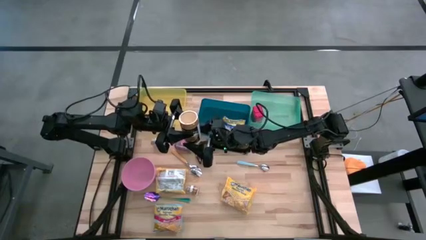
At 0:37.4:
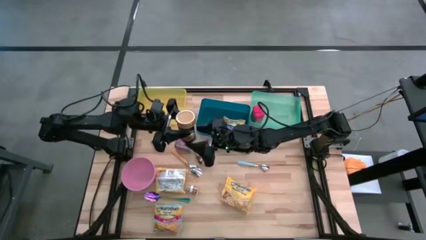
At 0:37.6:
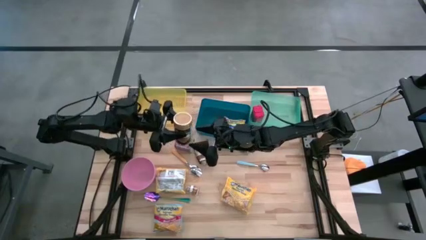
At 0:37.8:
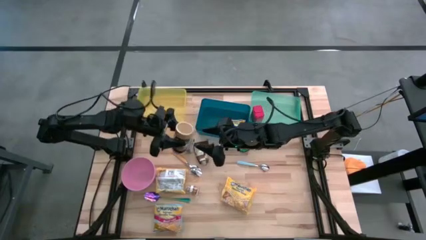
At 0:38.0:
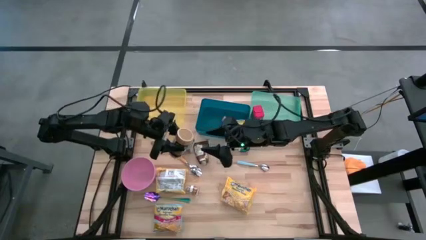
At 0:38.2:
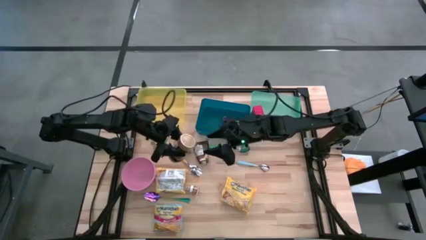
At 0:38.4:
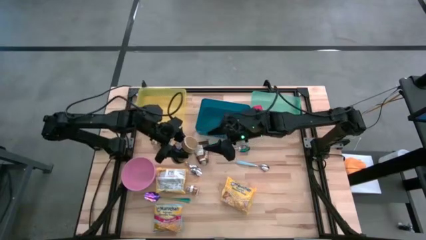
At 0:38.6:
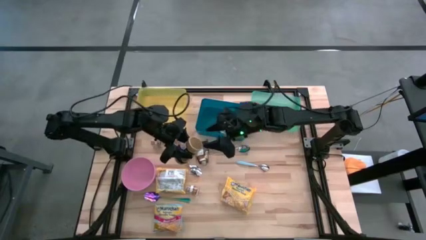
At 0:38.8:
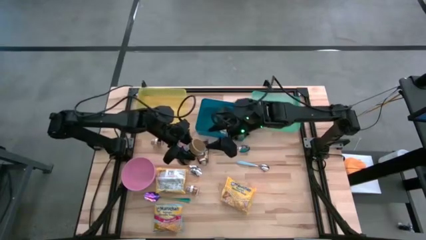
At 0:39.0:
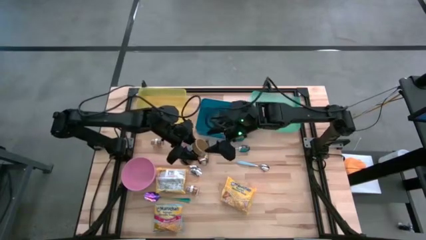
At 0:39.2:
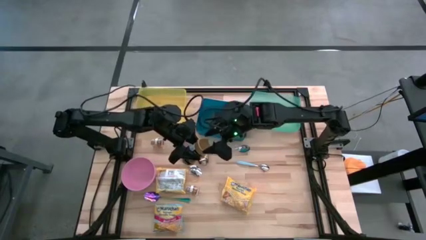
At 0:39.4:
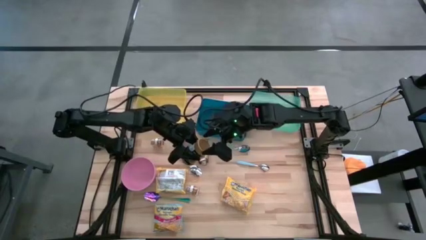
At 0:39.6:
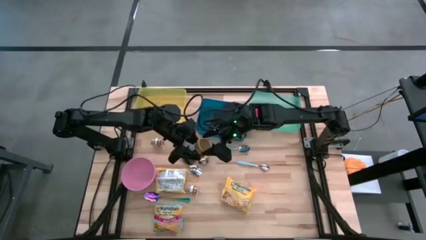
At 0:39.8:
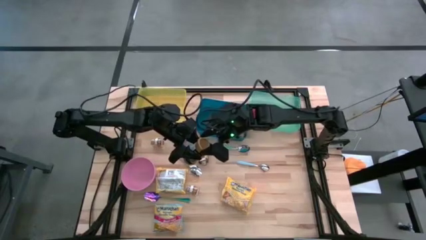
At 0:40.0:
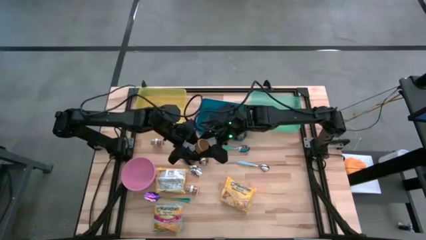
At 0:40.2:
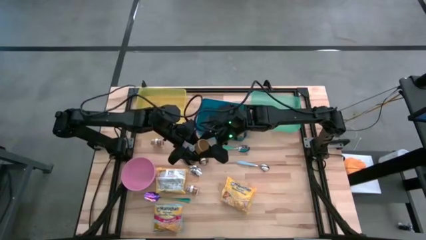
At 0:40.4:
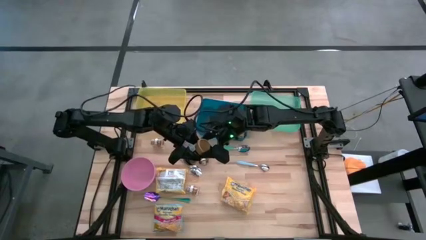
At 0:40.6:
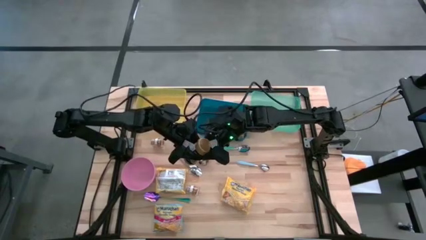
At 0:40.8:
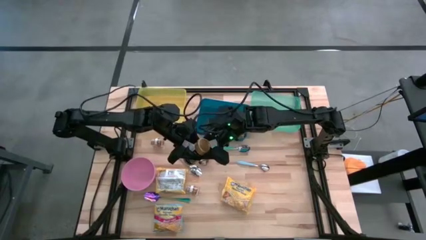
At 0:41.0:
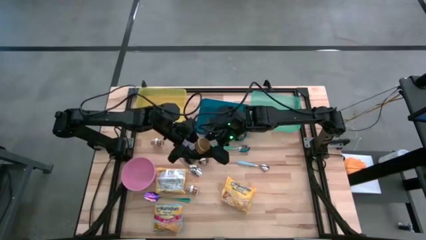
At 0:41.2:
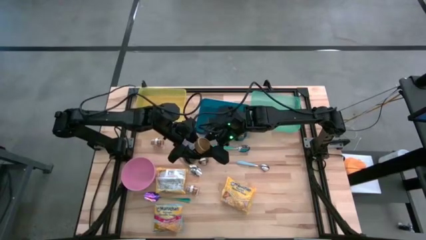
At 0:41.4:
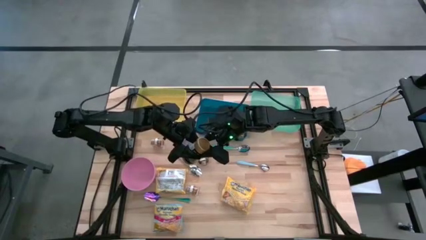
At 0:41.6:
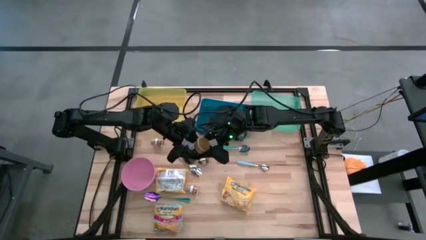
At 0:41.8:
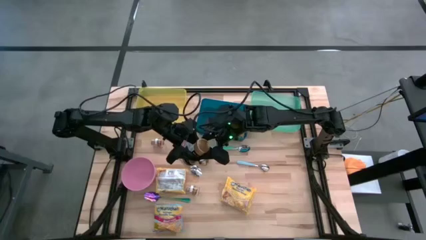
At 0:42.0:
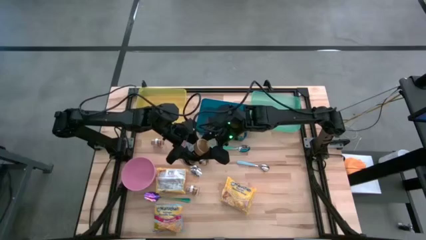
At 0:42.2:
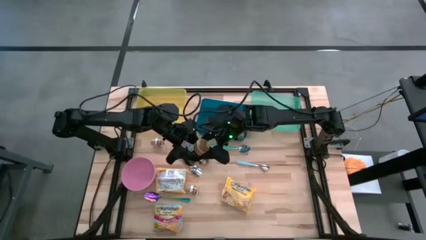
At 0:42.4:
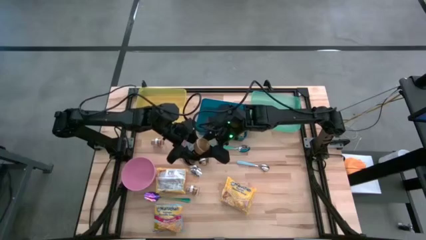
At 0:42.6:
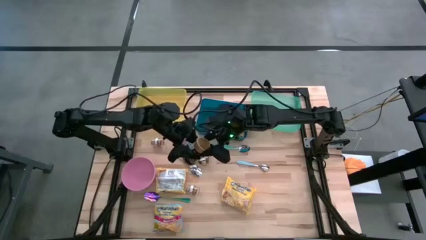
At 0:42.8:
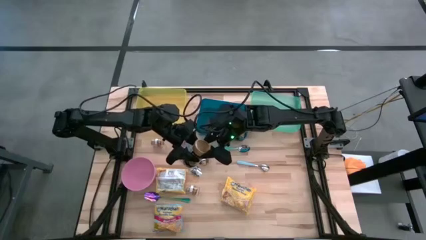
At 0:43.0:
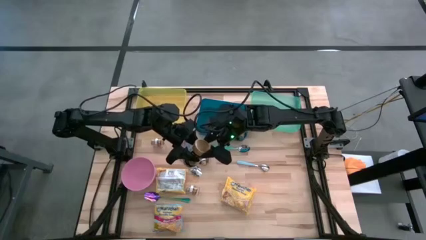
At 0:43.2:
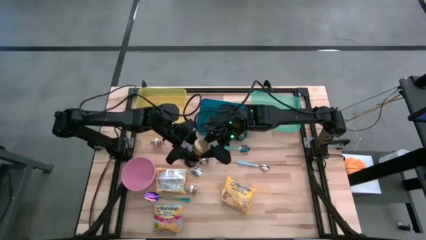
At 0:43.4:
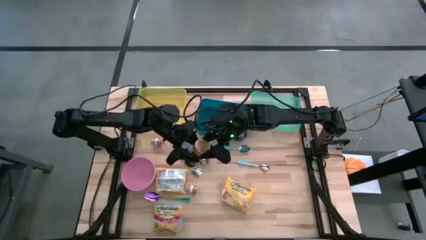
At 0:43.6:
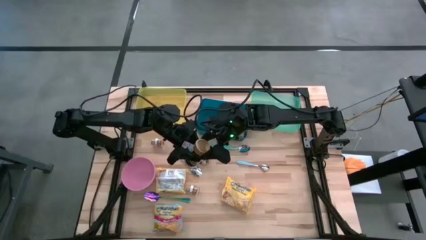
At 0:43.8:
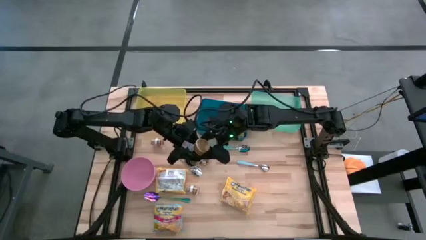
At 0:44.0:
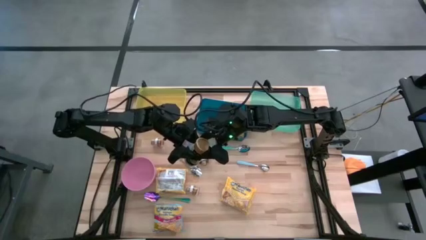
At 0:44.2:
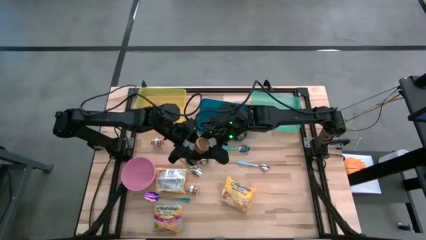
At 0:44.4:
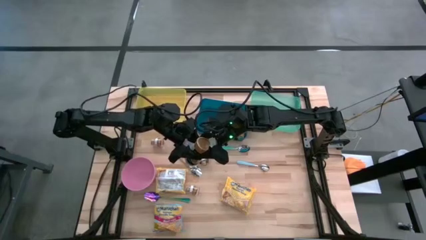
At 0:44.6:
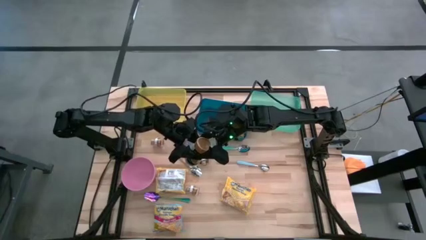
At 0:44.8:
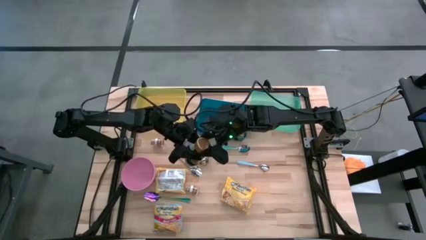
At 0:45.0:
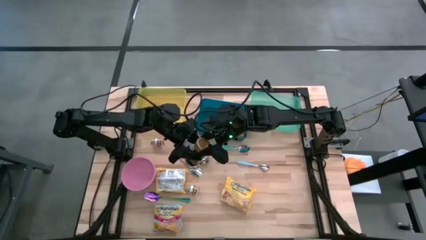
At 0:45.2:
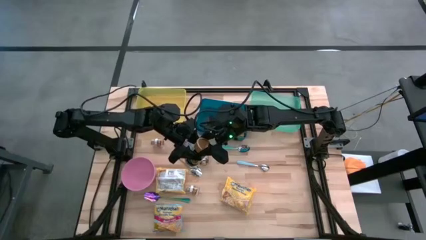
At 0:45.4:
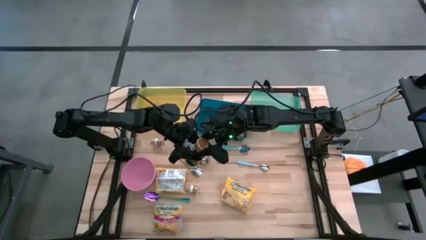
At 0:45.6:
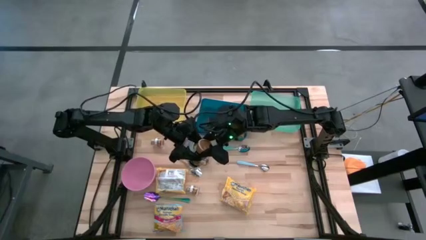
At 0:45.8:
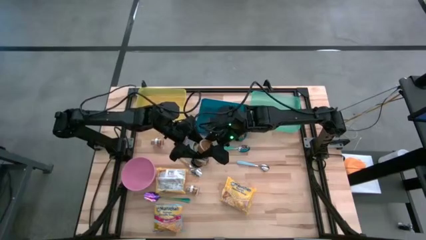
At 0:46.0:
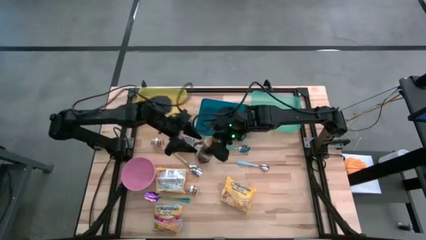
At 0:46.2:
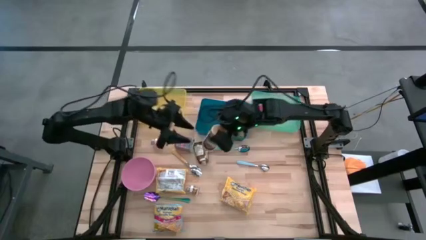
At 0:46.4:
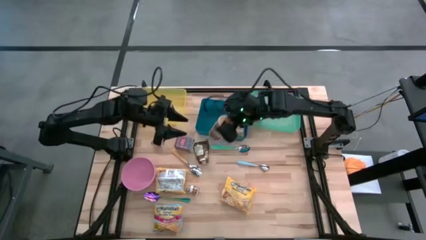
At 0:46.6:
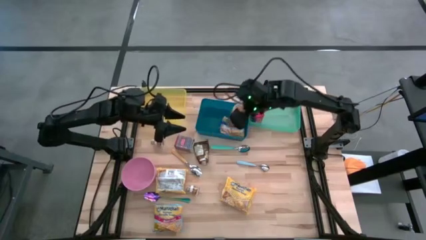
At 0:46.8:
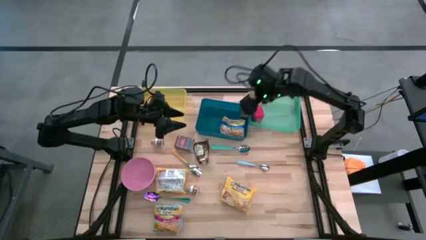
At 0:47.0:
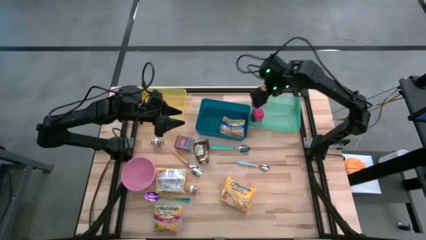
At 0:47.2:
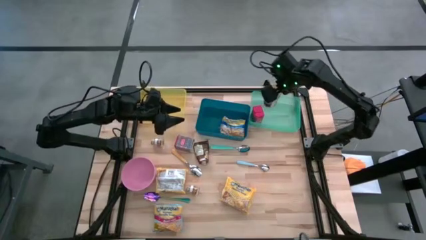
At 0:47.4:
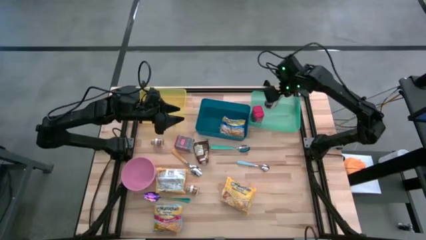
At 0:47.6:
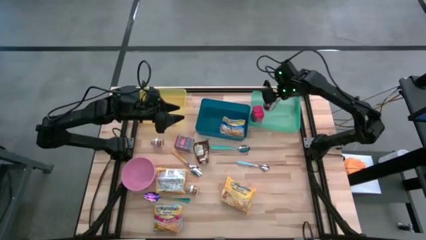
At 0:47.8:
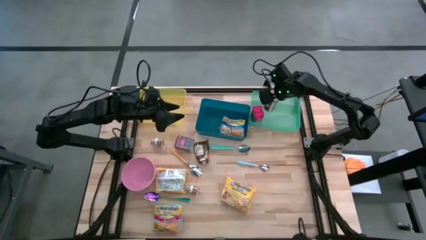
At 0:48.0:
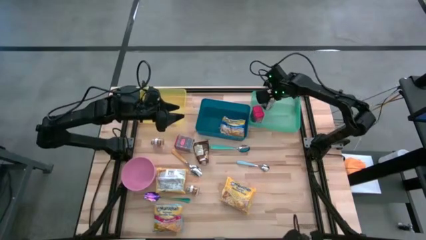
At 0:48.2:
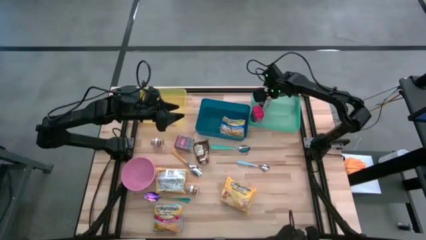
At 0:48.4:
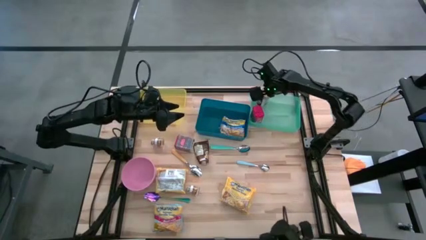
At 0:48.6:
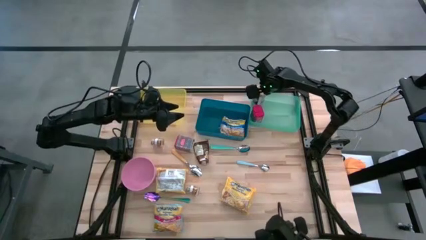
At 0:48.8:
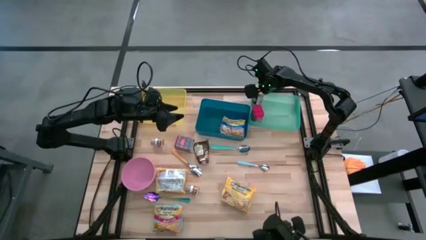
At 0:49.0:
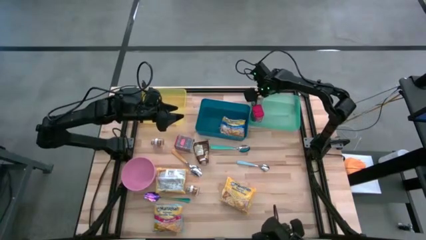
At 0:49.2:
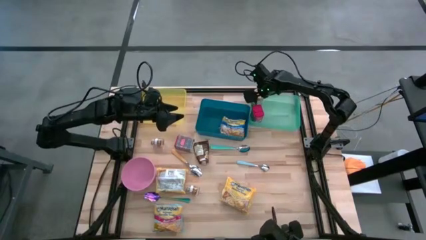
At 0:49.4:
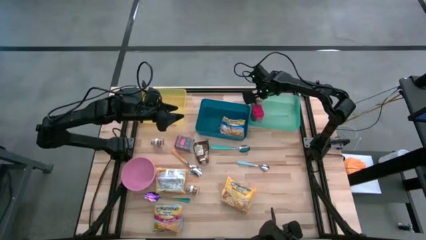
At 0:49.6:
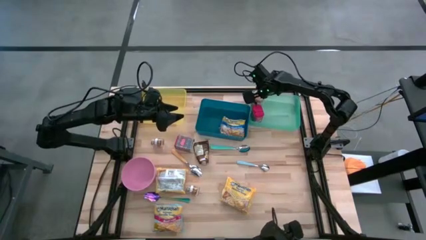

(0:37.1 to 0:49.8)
Put the golden seasoning bottle into the light green bin
